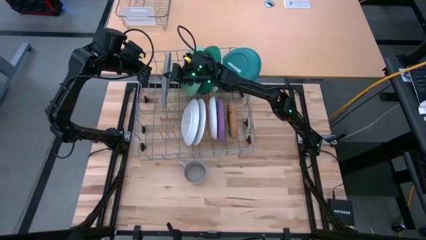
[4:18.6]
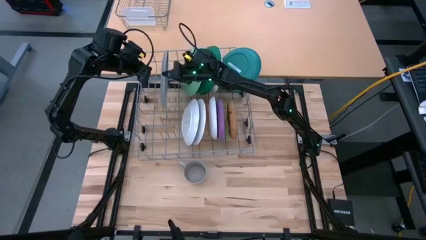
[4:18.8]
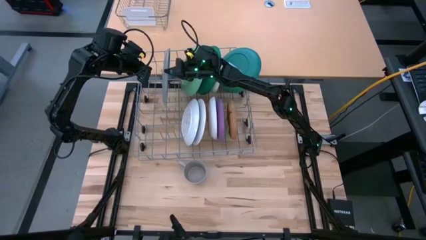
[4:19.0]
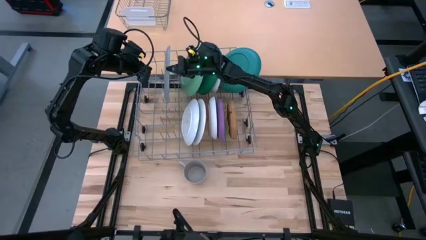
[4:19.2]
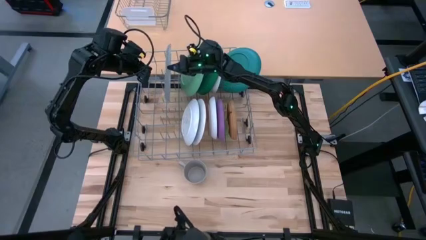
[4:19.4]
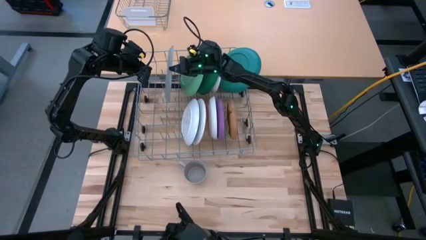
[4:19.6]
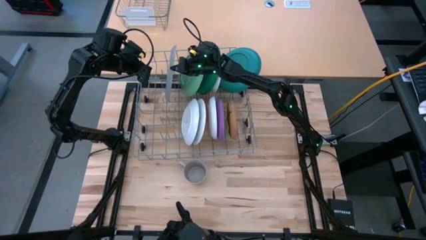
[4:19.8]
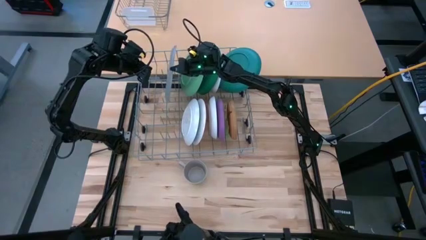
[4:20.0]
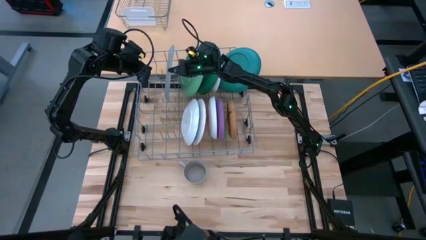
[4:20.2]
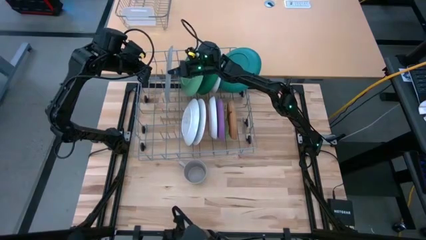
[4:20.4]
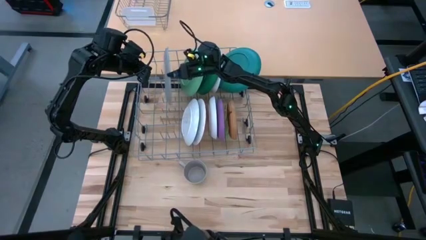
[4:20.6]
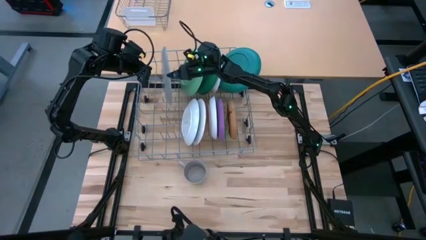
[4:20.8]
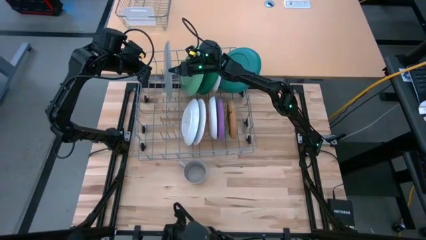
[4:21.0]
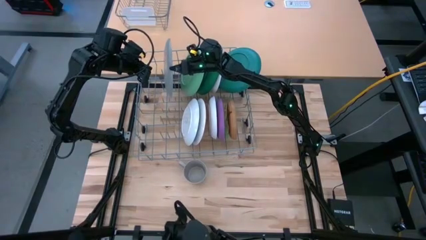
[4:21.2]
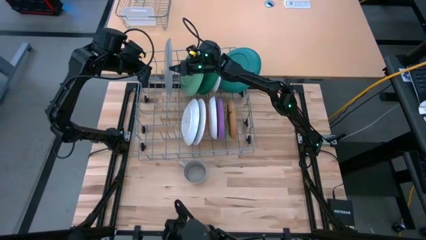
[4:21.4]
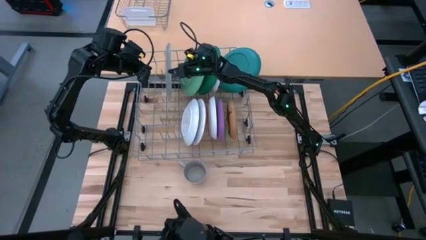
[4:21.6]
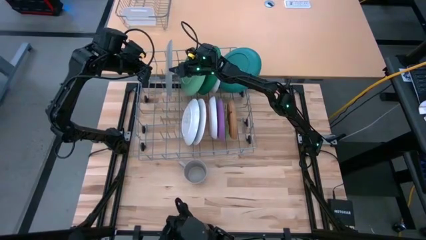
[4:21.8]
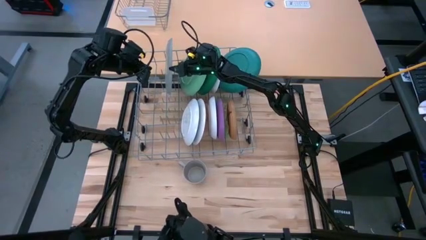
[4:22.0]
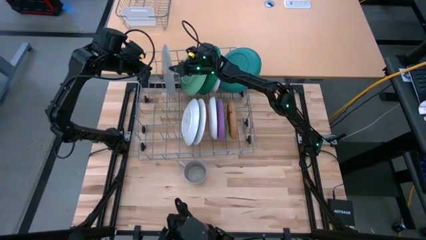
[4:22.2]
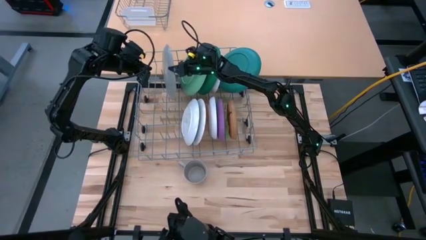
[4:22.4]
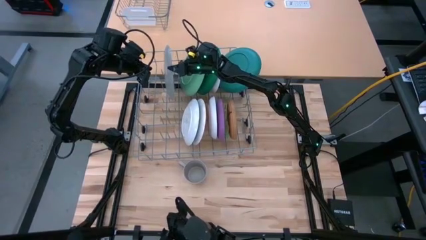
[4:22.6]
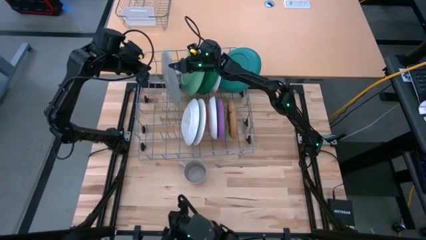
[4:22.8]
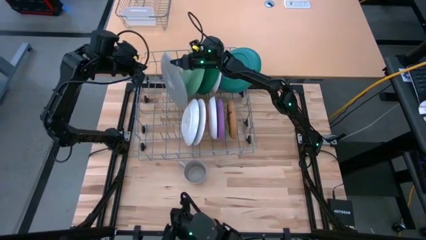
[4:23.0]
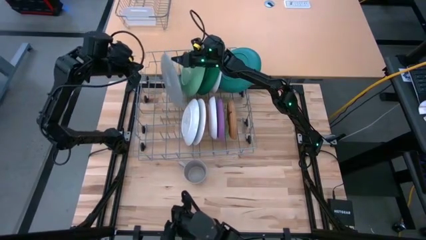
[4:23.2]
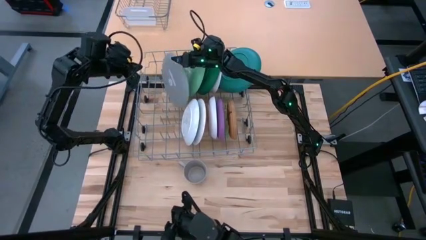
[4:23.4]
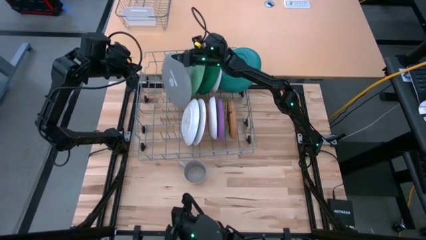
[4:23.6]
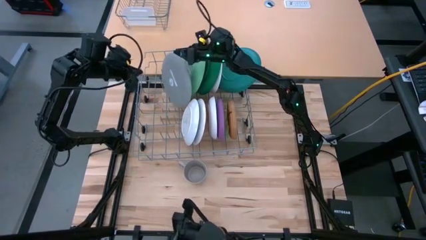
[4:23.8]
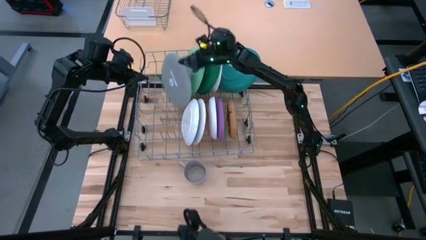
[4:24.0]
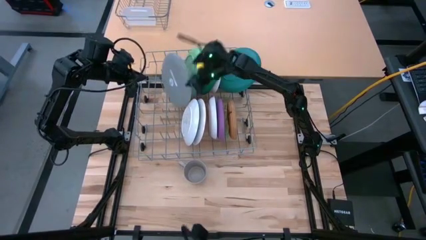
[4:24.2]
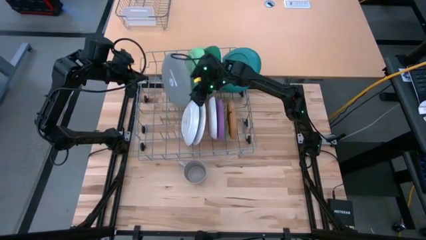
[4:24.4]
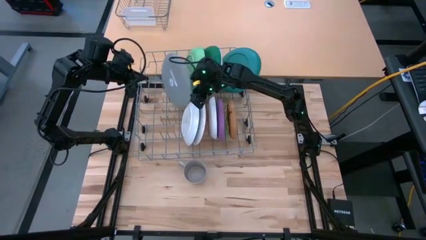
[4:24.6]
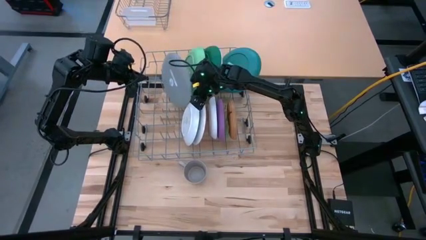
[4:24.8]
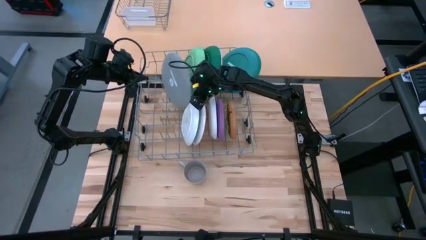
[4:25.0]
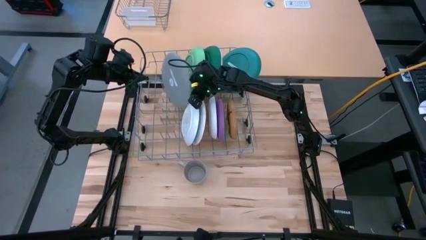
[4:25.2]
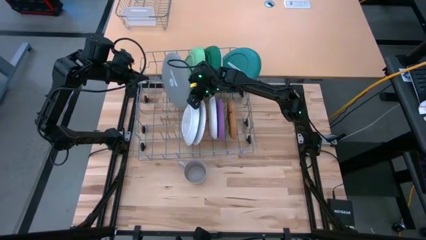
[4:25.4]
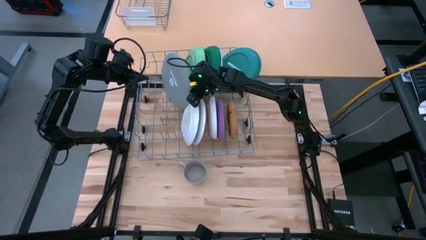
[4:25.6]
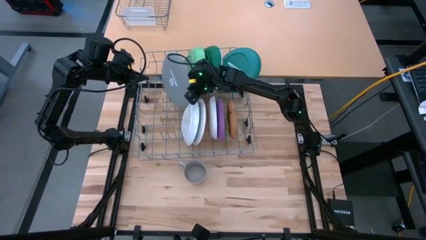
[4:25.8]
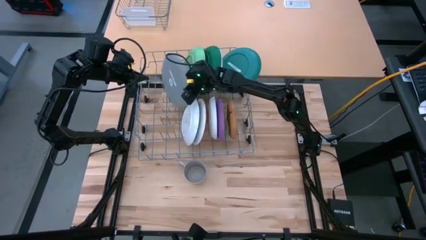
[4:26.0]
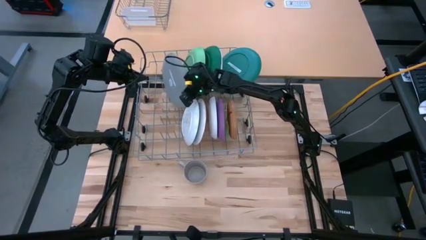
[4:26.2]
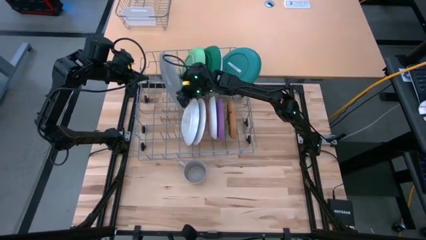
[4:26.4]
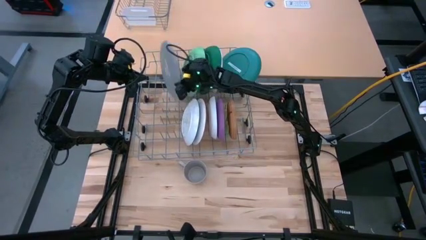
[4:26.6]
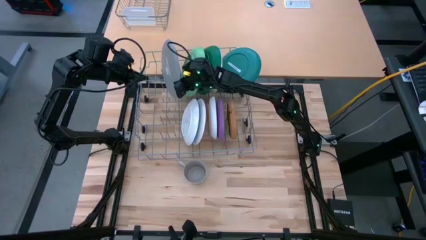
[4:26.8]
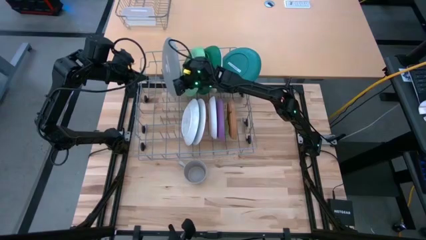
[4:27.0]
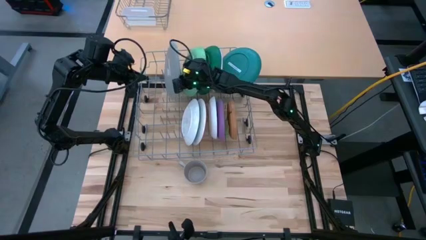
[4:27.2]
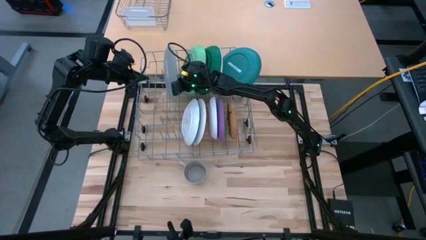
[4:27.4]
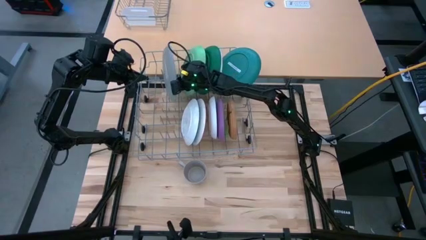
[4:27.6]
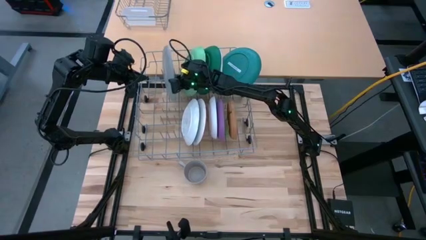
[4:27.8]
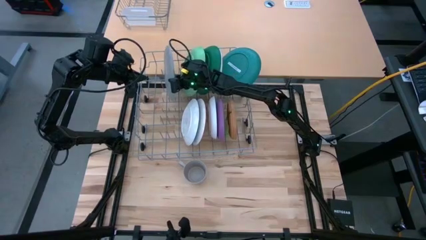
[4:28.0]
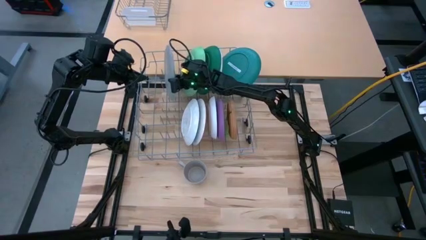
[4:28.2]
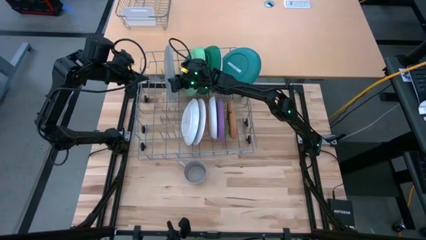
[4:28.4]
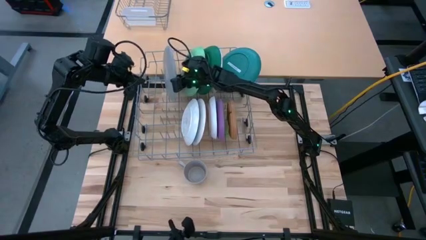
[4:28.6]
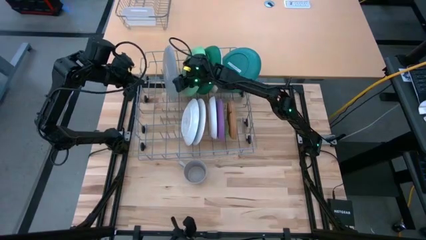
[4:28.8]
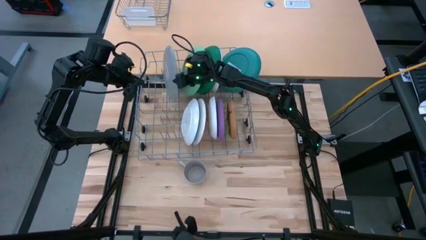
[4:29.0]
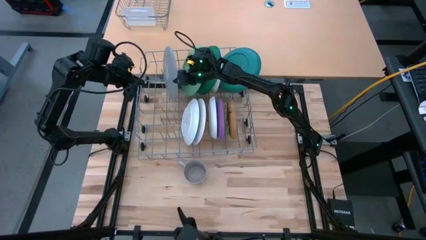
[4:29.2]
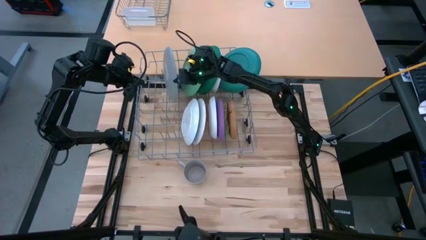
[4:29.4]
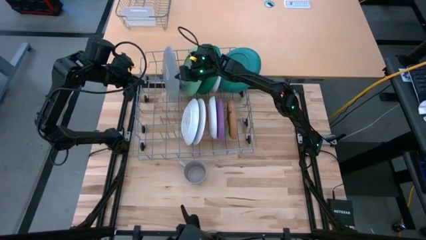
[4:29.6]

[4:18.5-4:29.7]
Task: Sort dishes
Adjust the gray plate

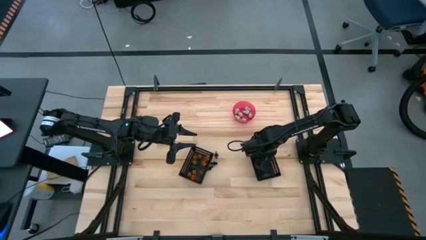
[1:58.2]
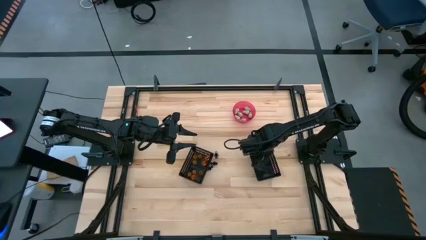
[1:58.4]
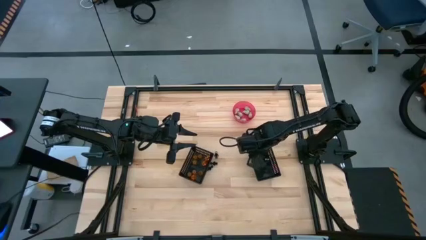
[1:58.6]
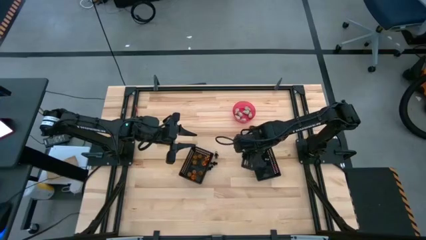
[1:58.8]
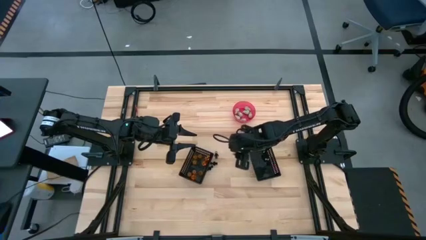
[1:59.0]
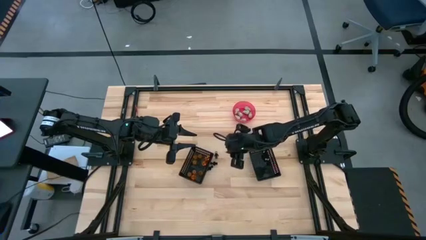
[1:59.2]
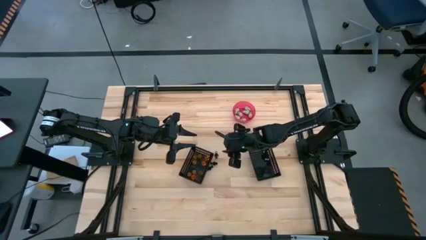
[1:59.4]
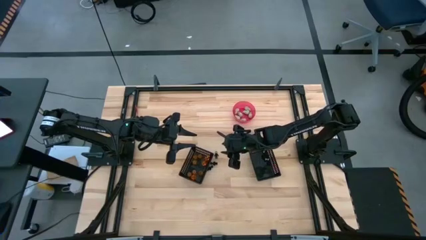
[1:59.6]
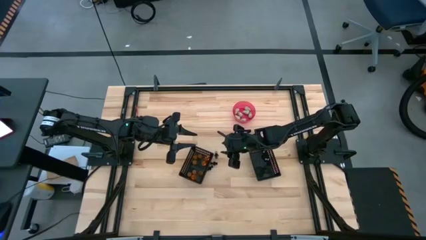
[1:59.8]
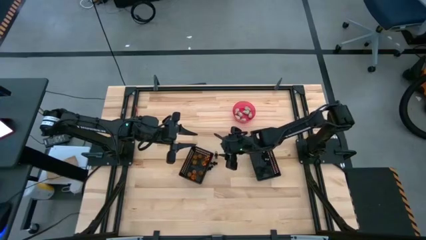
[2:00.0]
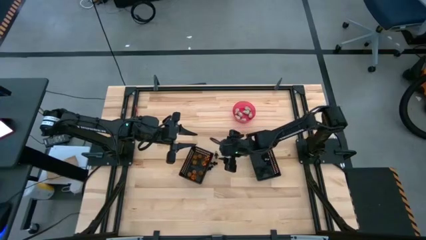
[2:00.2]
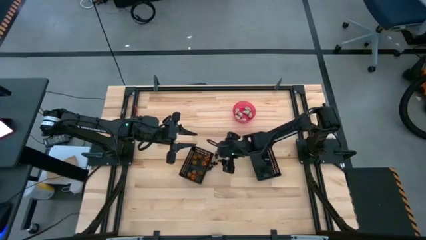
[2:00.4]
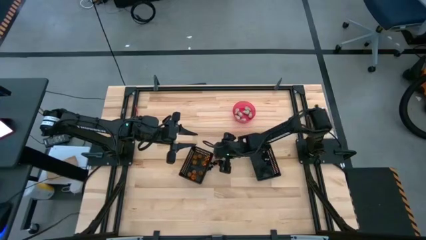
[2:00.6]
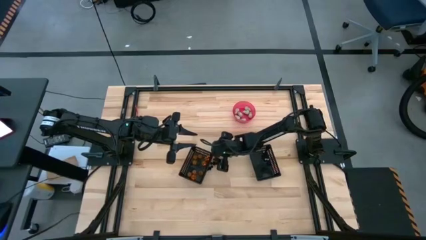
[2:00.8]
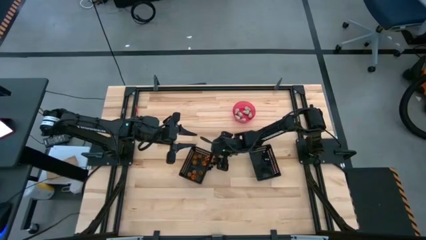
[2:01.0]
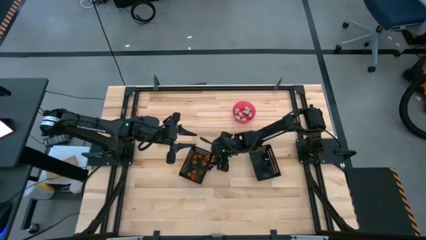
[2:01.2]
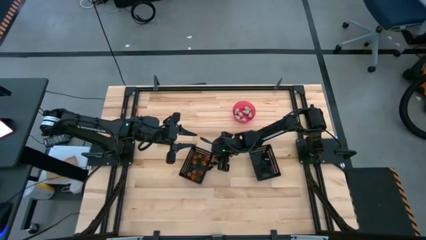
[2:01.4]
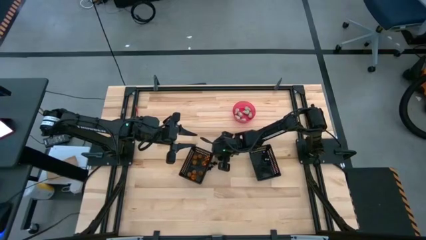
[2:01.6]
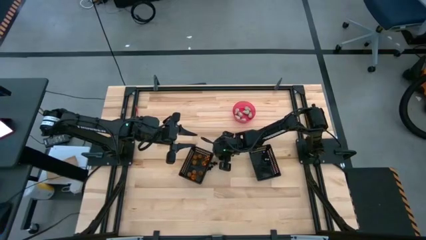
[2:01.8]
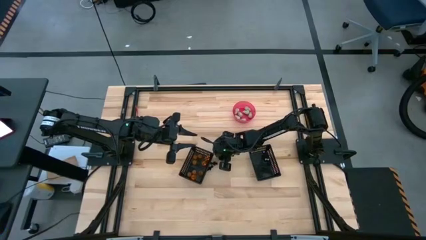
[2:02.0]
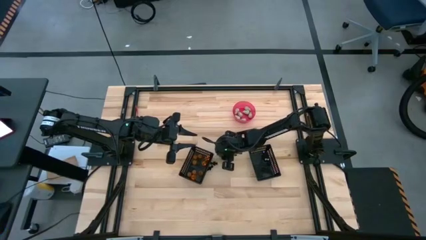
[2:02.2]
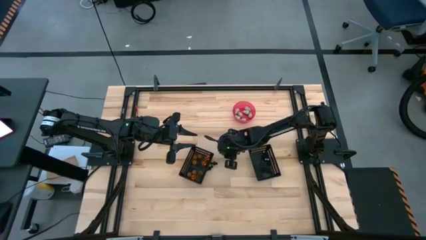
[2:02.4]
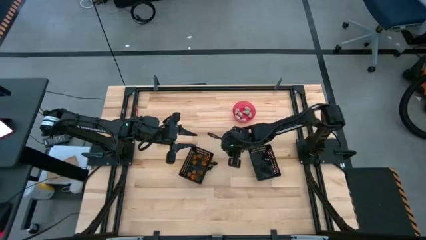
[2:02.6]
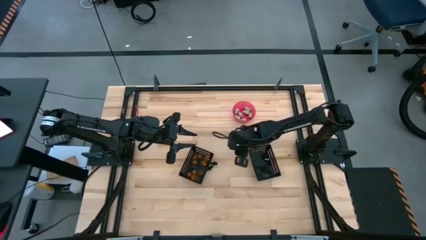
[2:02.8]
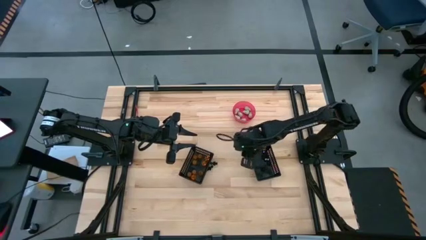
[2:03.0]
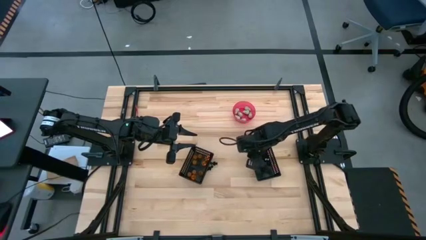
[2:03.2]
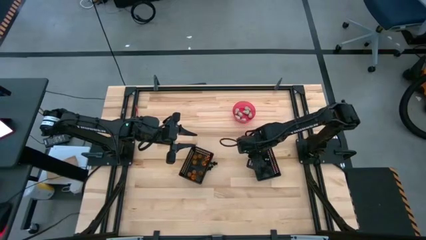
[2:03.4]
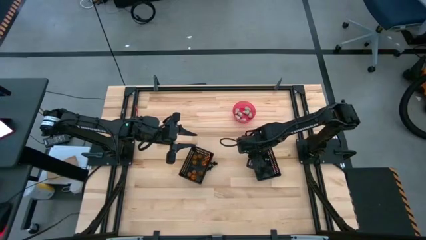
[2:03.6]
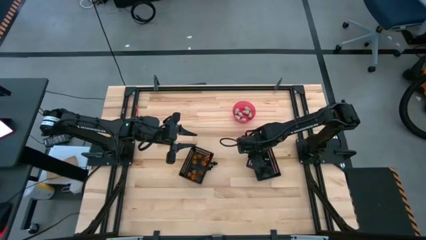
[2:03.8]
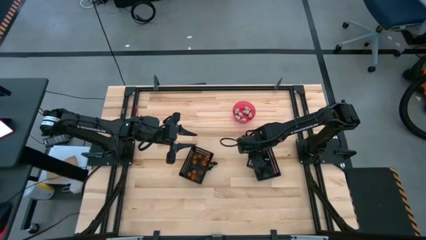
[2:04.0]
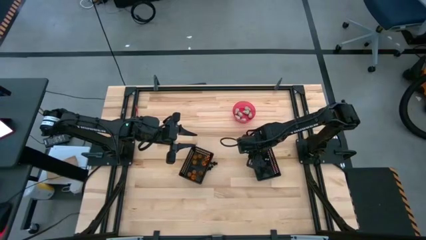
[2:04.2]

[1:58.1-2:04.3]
Task: Sort Halloween decoration
Put the black skeleton toy into the right black bin
